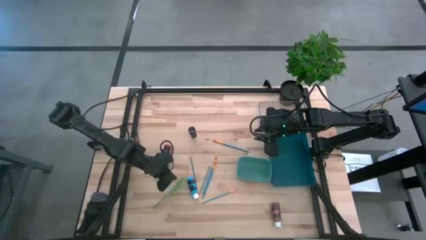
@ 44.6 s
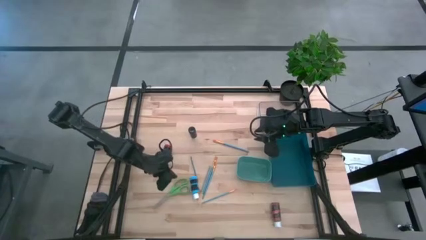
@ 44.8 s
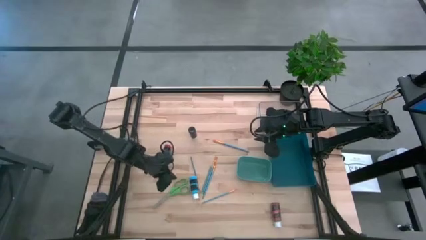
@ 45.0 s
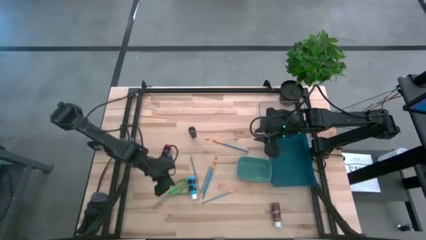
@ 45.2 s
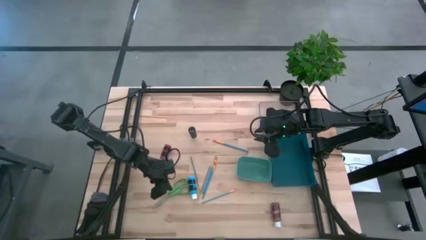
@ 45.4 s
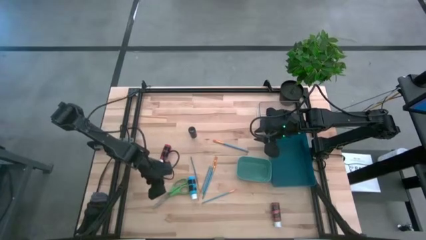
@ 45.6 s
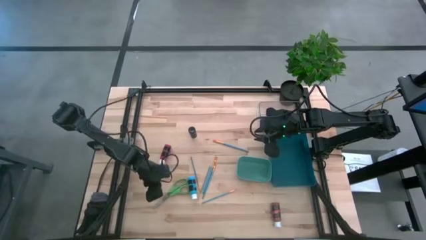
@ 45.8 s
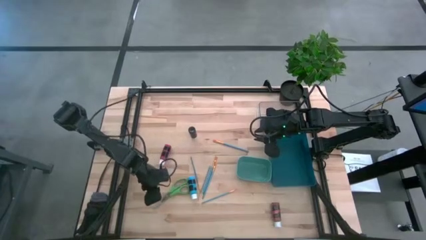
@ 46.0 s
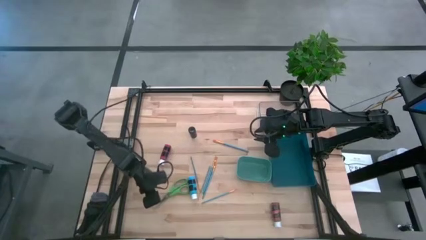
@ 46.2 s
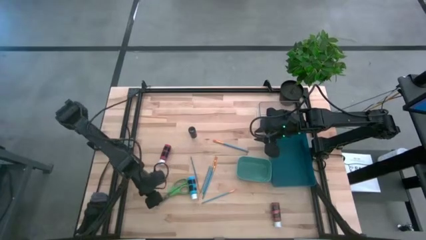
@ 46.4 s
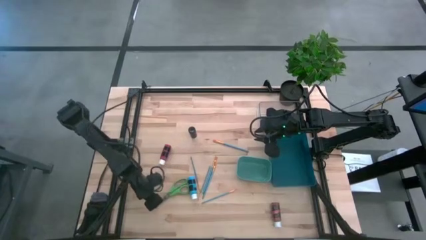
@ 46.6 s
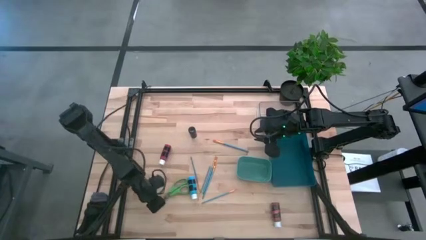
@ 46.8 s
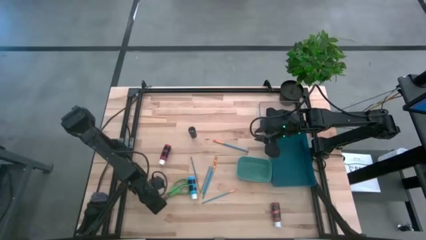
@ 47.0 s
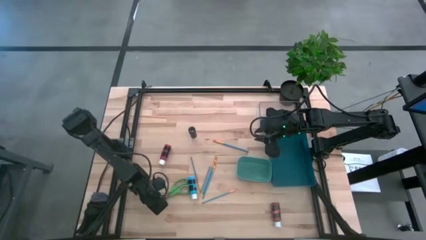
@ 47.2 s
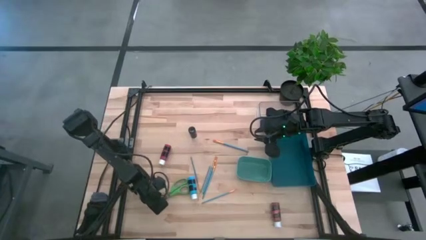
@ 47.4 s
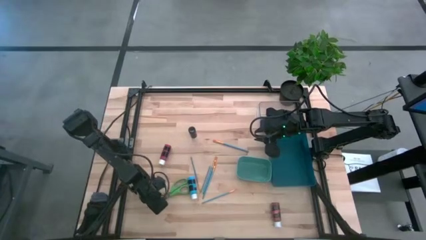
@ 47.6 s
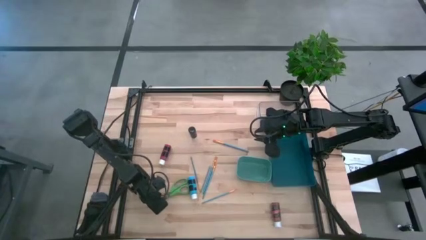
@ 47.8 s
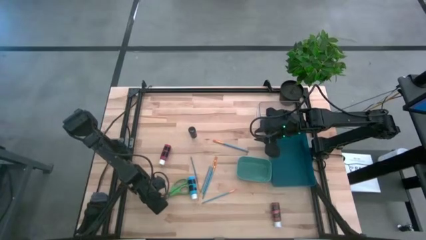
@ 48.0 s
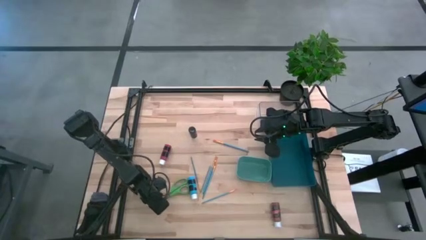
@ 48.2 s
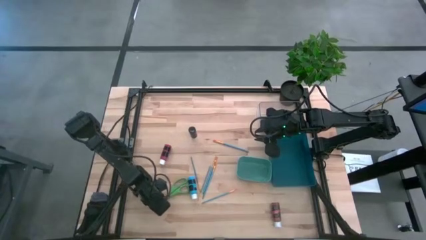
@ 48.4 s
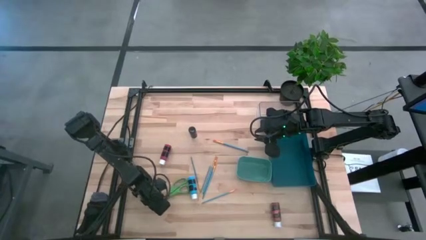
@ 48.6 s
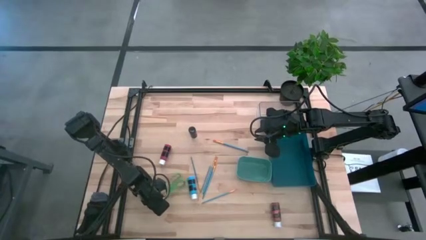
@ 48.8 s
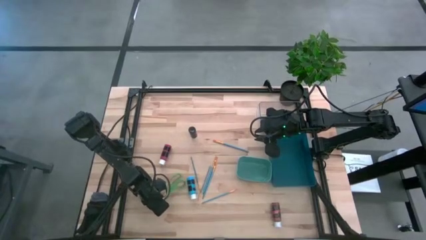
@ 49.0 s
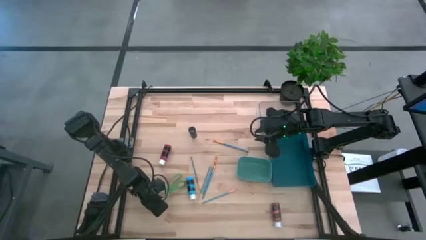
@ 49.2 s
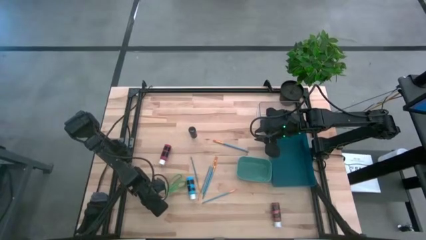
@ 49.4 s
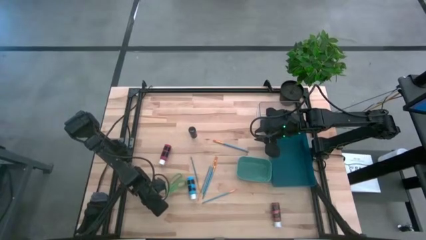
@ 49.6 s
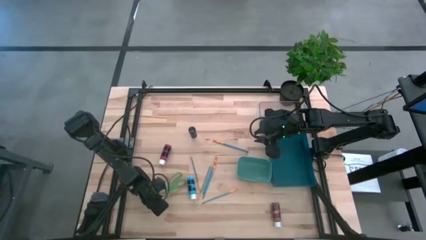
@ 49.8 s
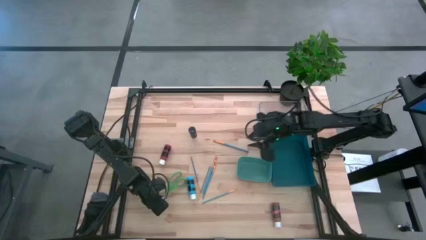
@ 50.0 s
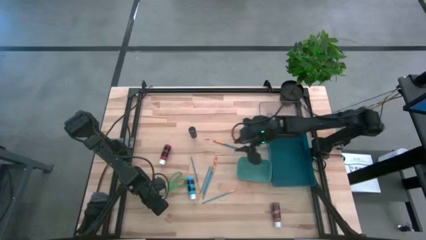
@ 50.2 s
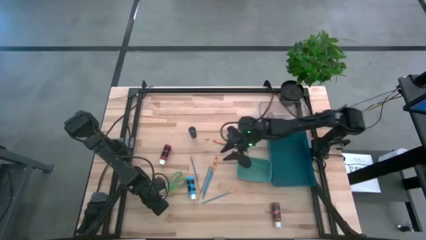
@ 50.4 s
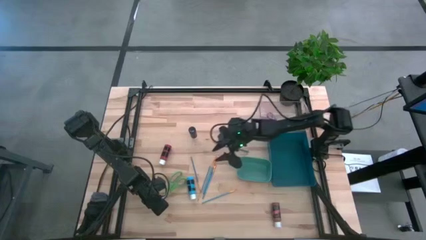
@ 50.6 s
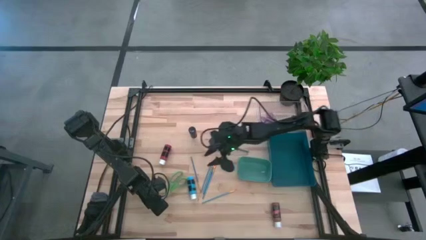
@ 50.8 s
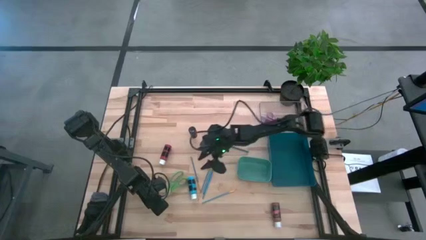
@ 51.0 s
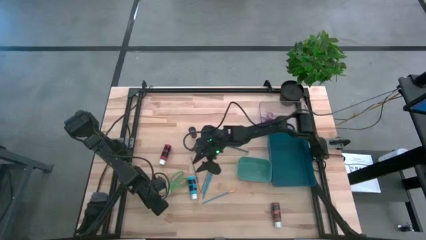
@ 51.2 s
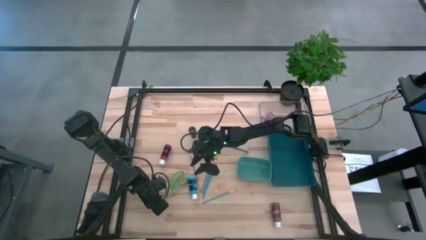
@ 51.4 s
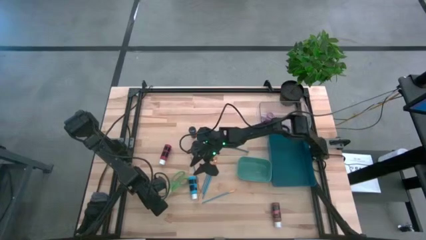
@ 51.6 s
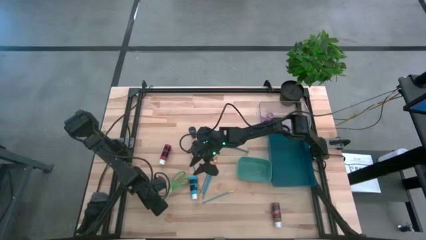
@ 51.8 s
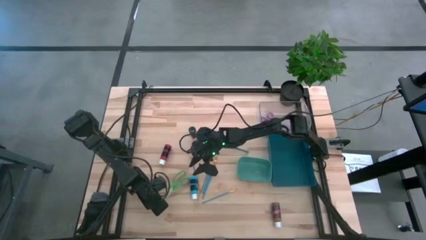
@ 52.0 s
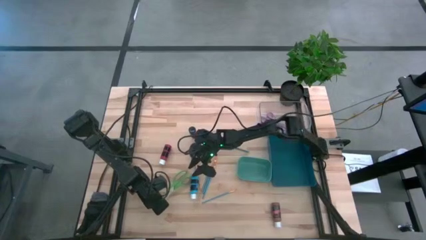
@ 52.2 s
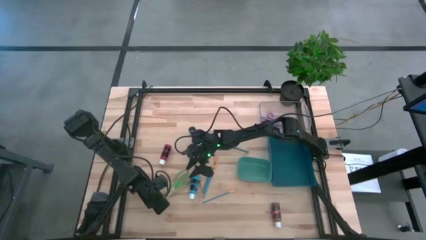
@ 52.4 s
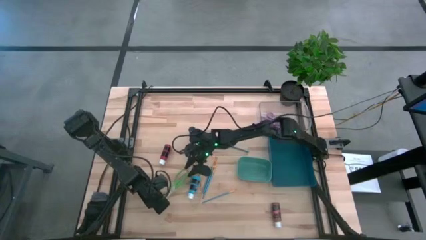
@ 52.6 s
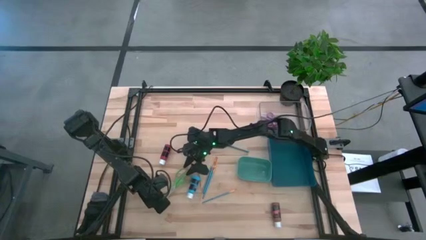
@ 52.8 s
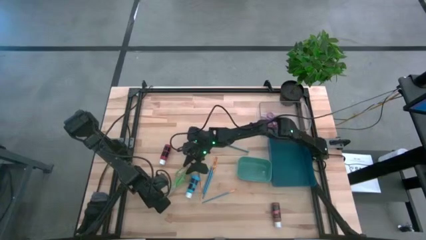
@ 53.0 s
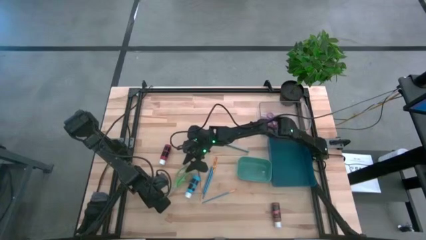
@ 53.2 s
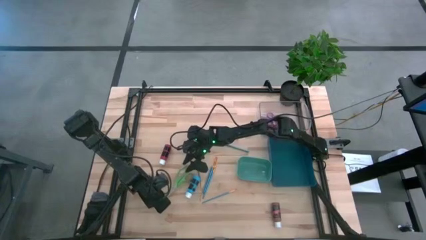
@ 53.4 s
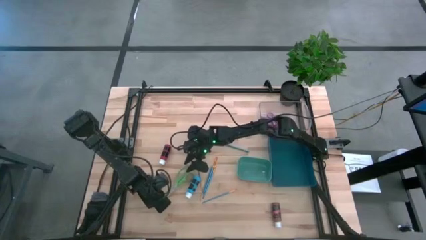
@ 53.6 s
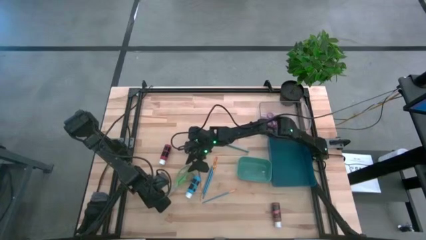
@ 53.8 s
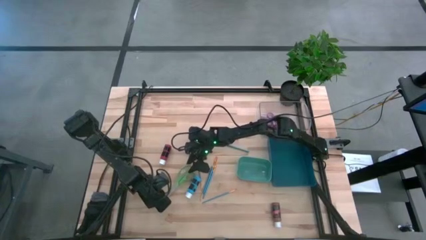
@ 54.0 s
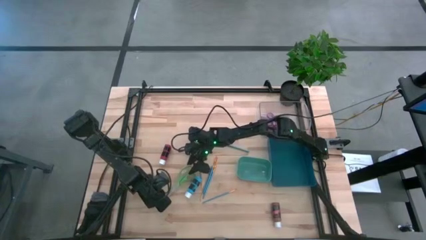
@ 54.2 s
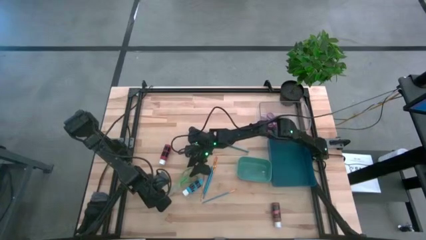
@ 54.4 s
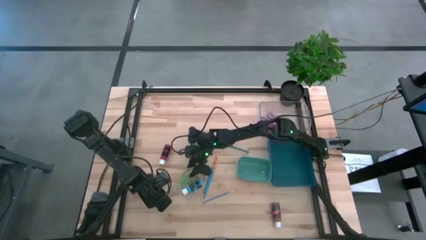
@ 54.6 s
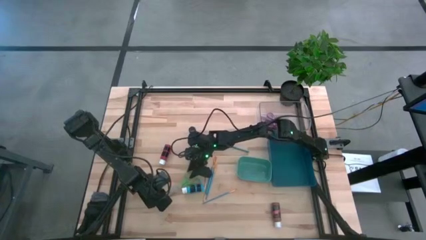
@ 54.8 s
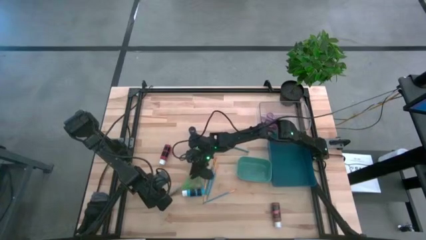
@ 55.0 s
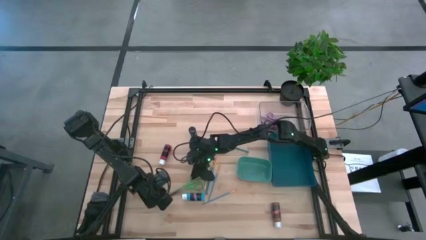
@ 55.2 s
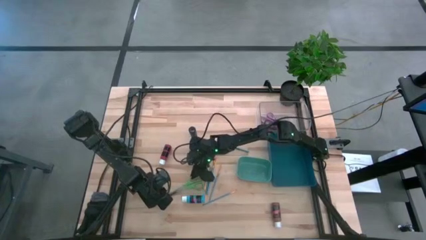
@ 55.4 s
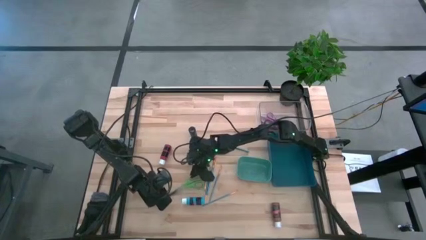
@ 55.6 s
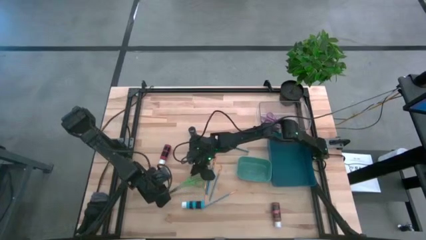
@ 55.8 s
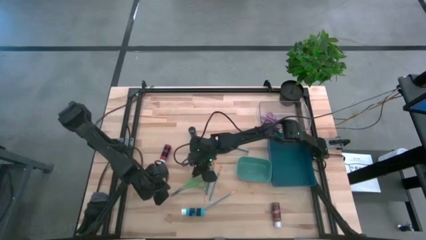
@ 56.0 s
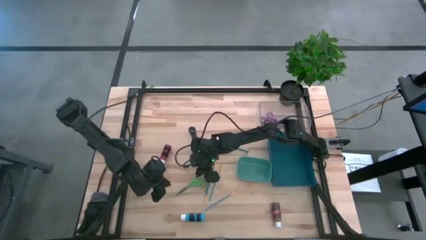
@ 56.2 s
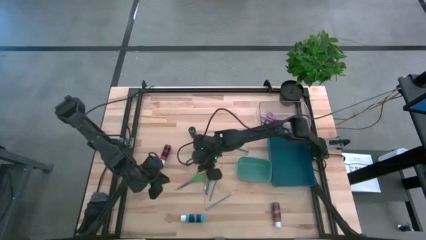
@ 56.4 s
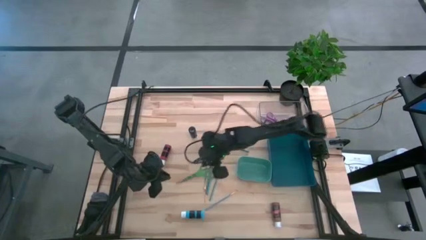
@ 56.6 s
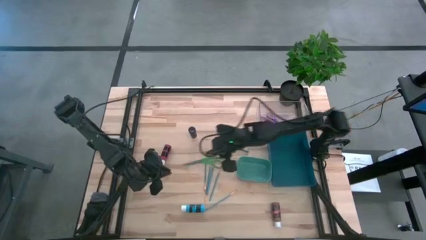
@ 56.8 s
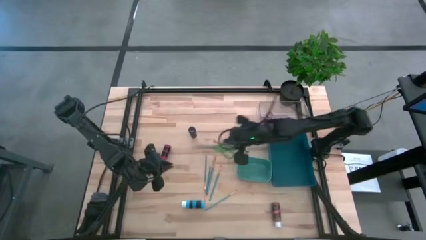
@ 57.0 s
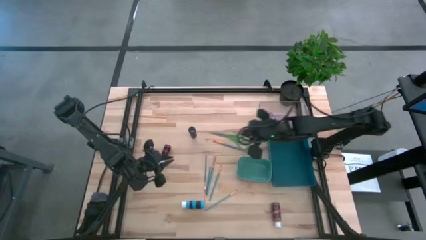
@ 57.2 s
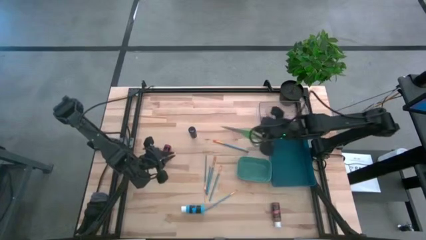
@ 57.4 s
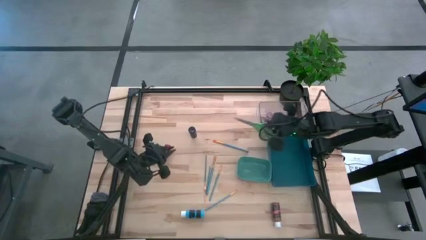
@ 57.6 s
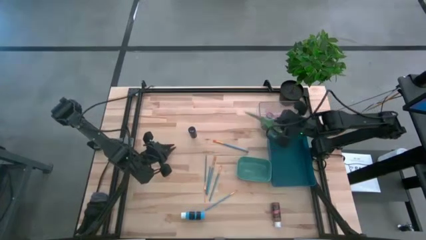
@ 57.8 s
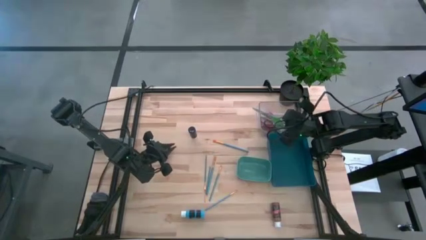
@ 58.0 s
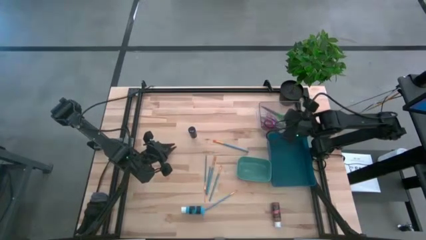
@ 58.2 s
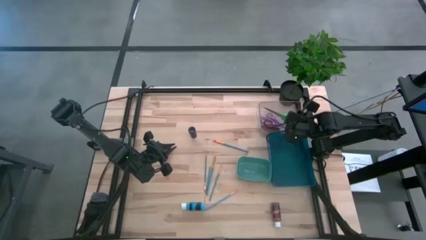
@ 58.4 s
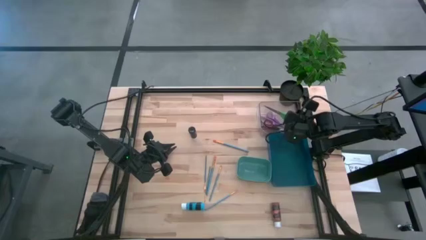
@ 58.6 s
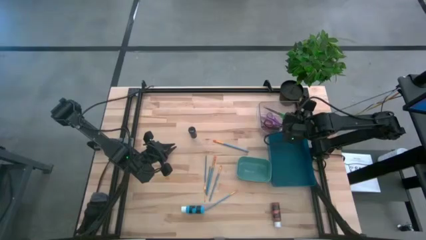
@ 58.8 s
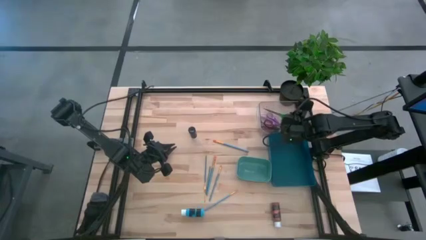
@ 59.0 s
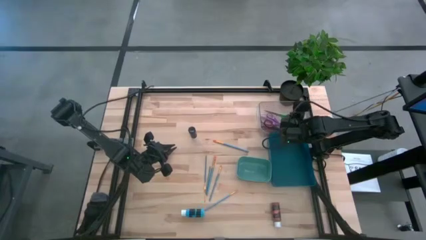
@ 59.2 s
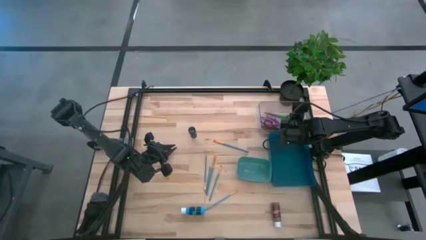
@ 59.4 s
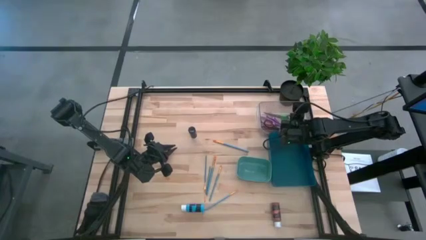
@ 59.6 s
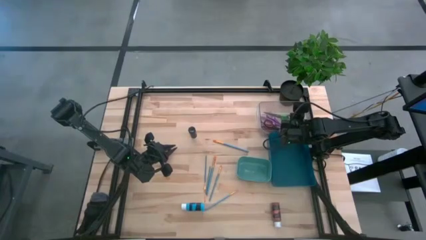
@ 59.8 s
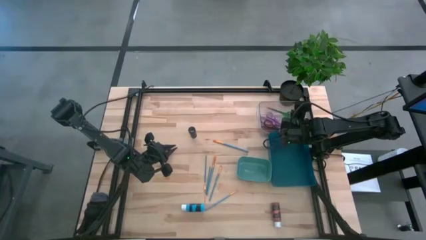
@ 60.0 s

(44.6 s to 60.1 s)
Task: Pick & Place Paint Supplies
Put the green scissors into the transparent bin

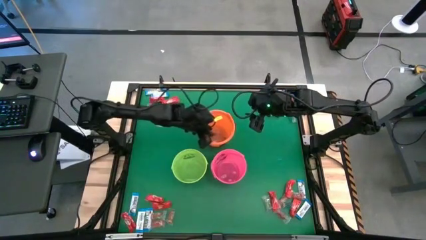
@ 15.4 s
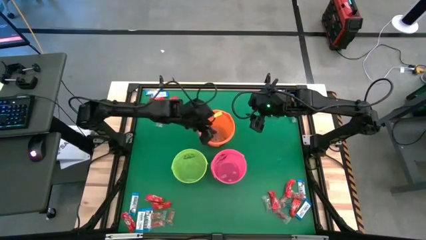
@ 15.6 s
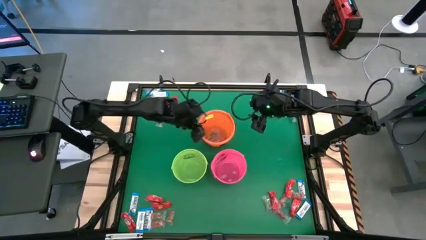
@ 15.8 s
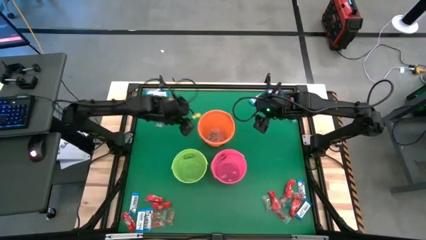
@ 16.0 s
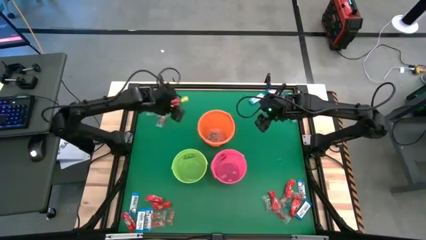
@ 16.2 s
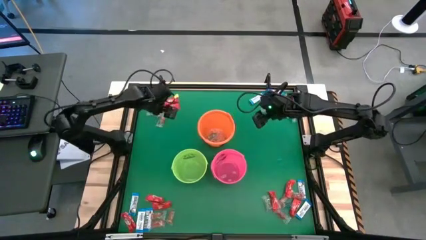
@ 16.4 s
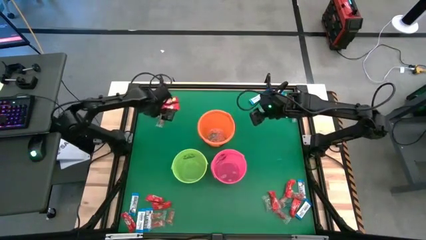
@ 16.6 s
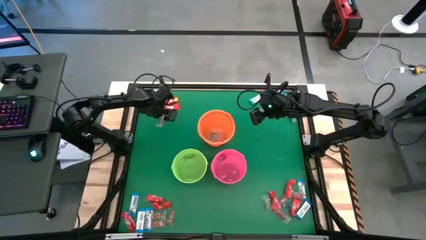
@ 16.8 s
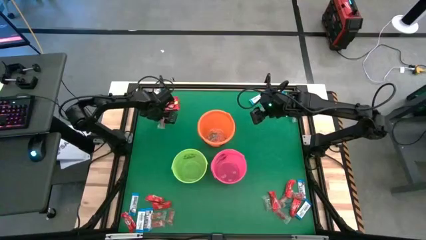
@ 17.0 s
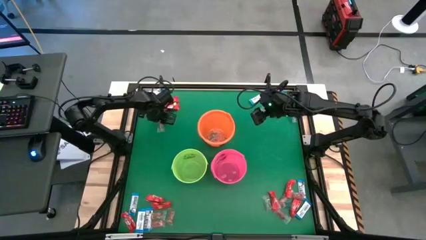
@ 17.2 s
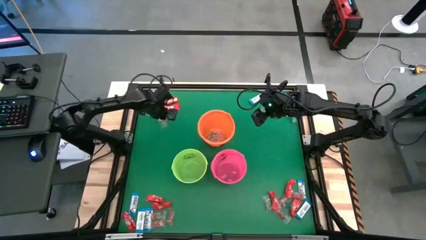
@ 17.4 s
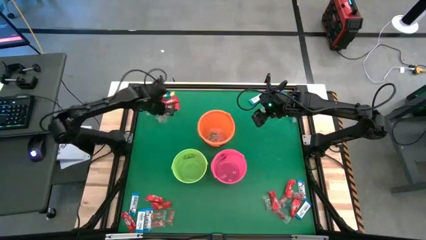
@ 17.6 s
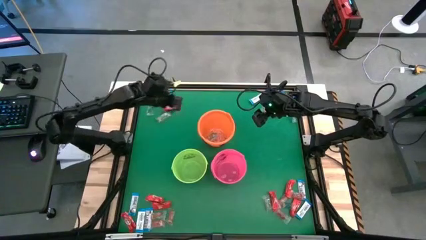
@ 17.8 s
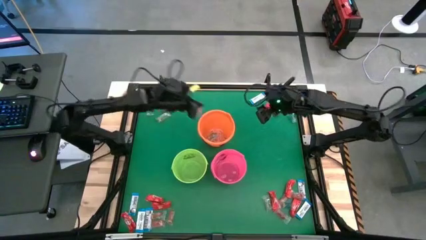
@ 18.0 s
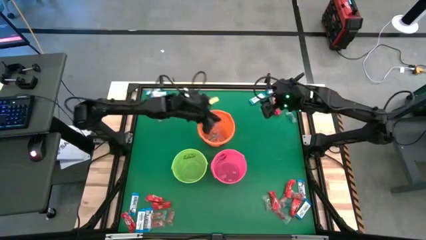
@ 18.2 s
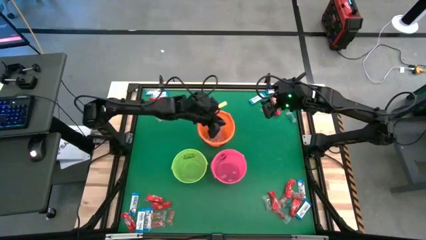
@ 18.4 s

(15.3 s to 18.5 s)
Task: Sort candy by brand, put in halloween buckets
Put the orange gummy into the orange bucket
